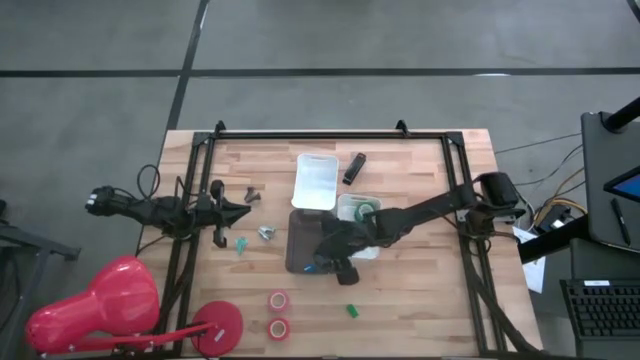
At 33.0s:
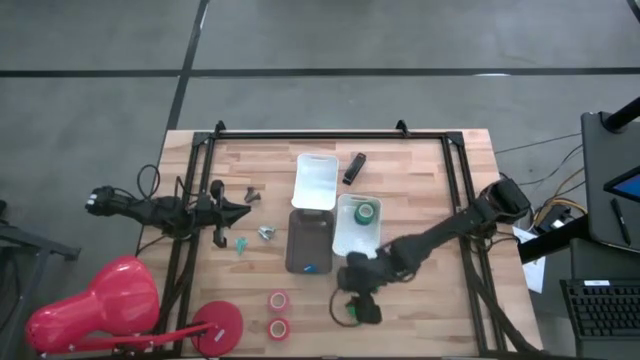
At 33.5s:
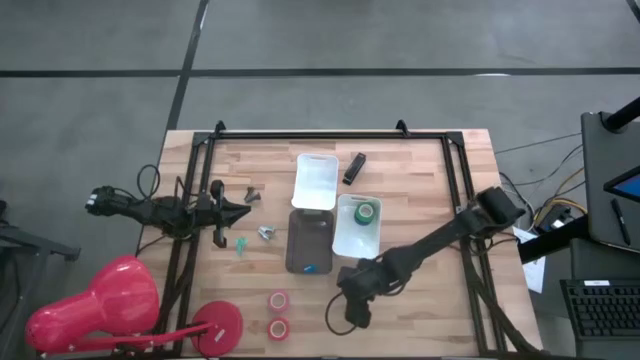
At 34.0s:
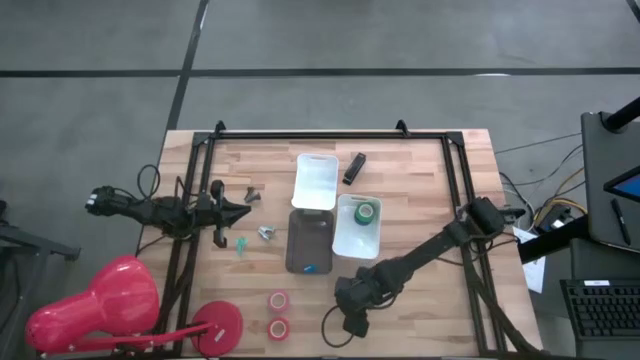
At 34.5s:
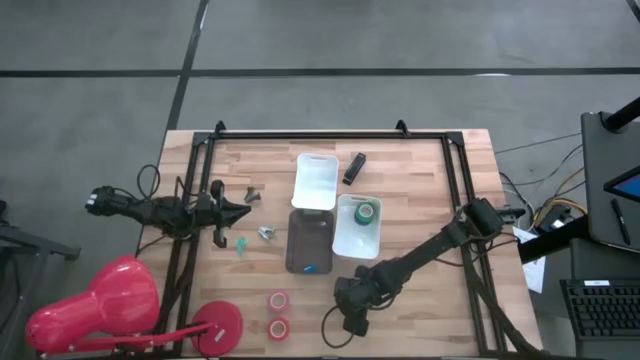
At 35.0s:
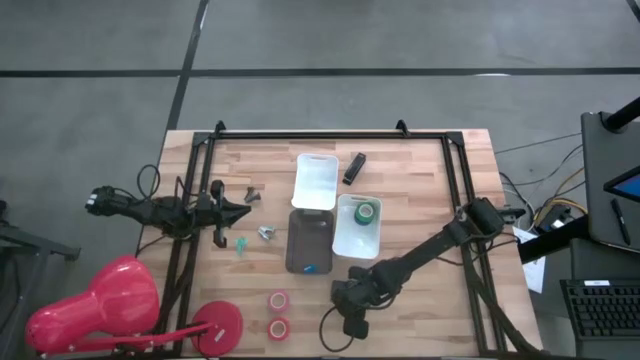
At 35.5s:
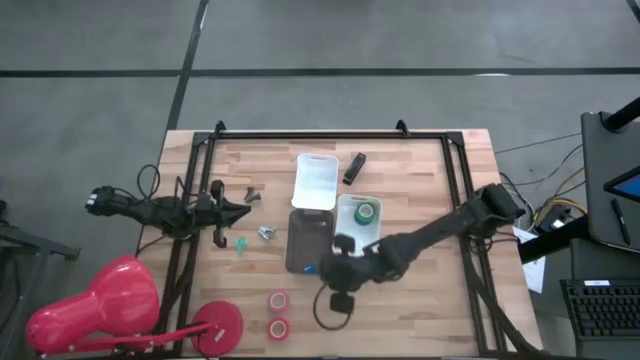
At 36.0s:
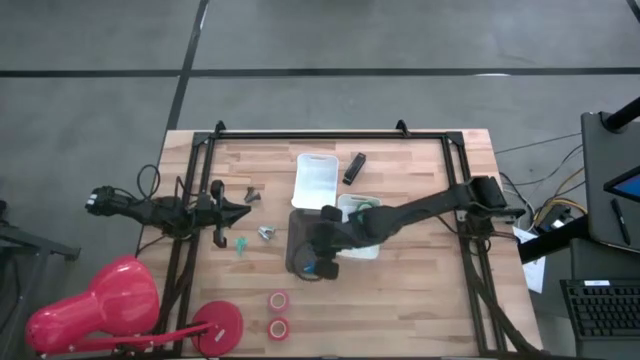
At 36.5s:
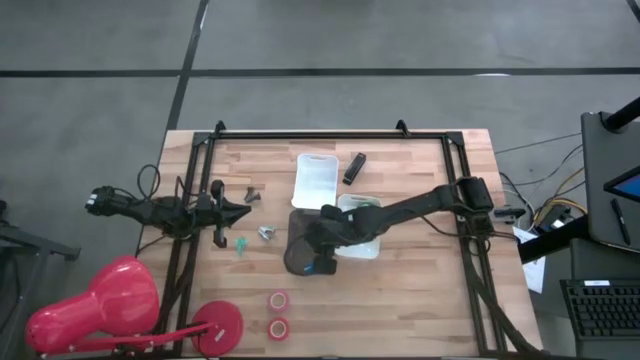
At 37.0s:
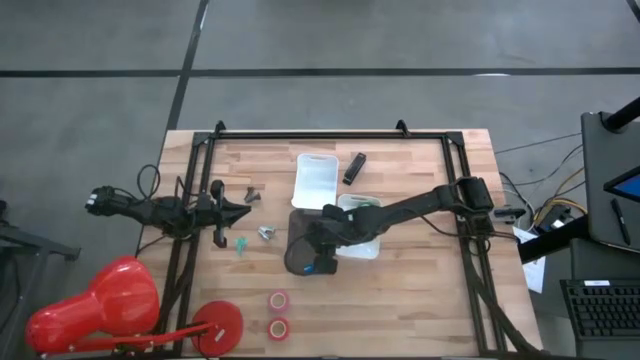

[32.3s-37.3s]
Task: Pick and place Stapler, Stapler remover, tape
Put the green stapler into the black bin

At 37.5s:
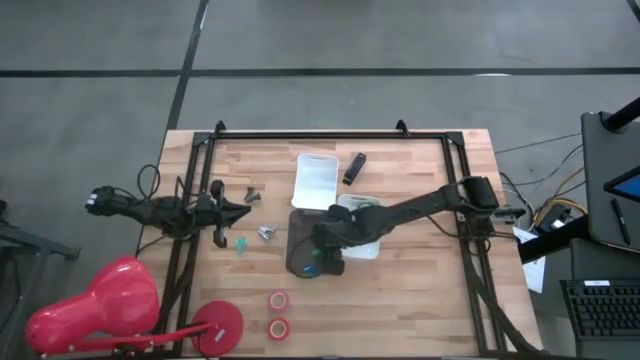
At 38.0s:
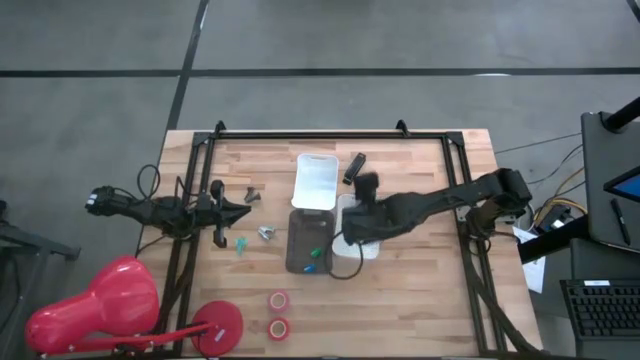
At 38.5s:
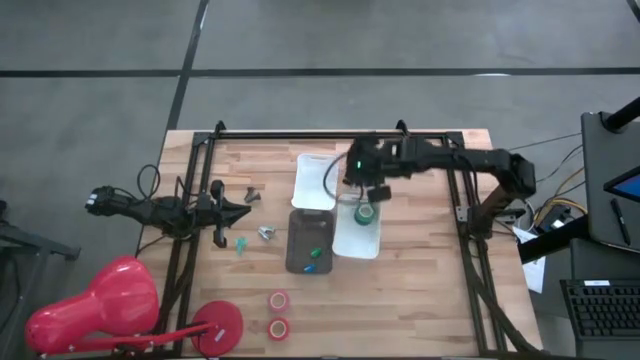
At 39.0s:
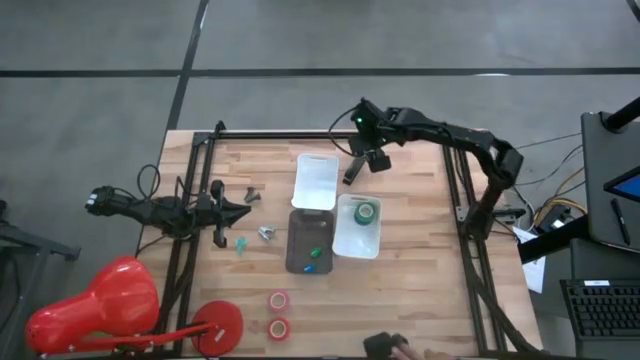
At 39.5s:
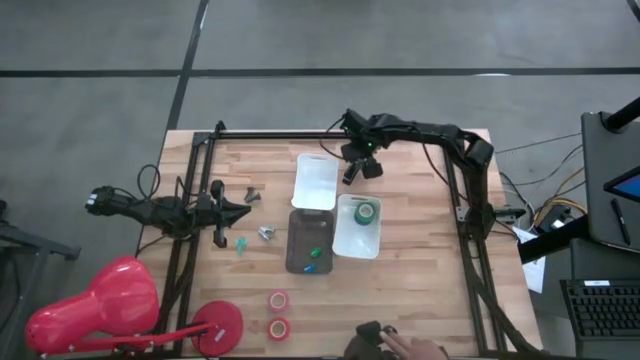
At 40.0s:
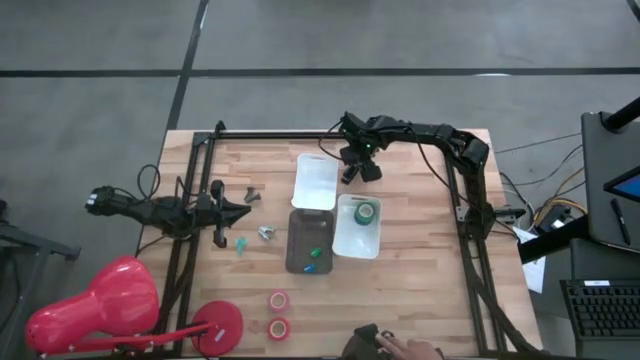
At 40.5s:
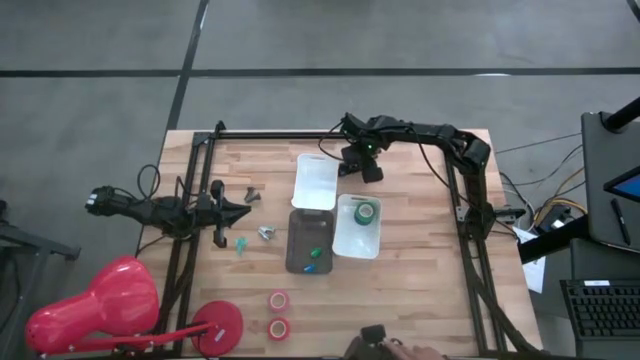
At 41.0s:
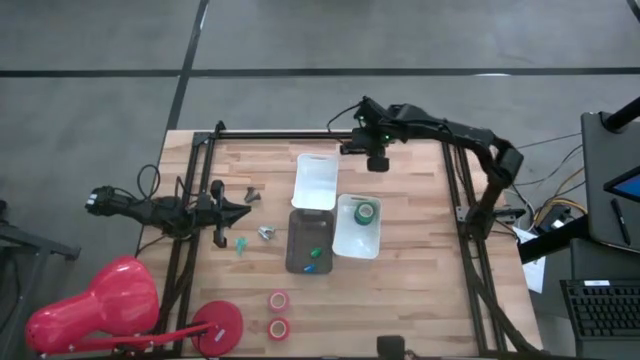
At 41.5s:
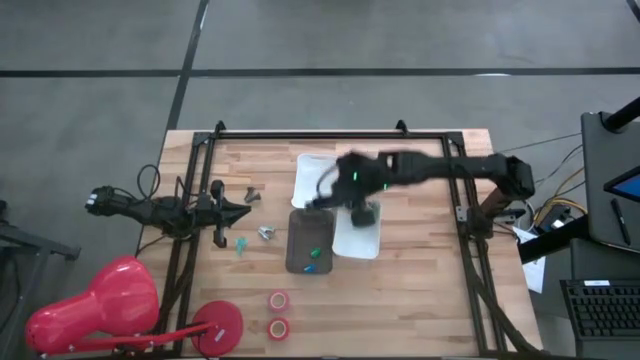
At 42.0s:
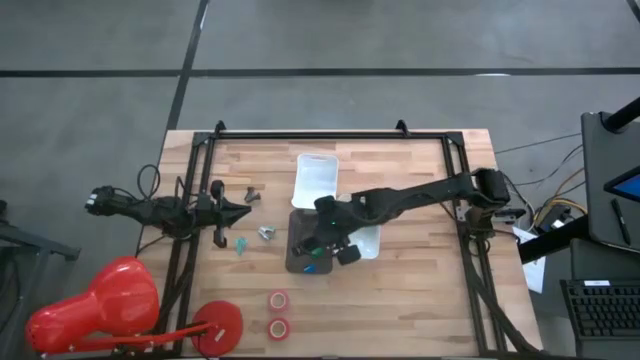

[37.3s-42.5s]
Put the black stapler into the black bin

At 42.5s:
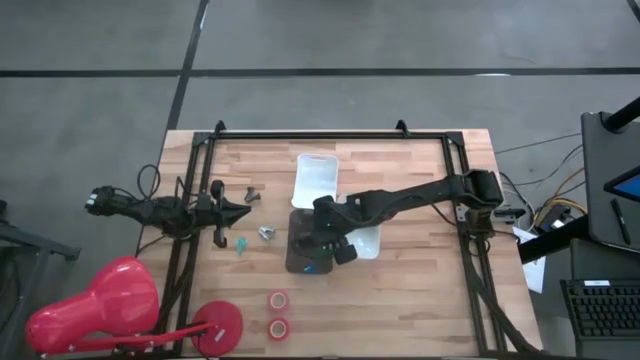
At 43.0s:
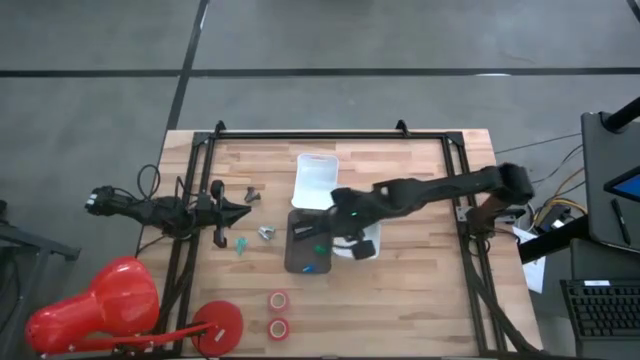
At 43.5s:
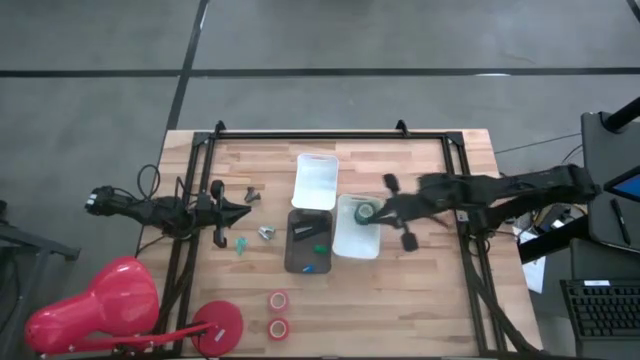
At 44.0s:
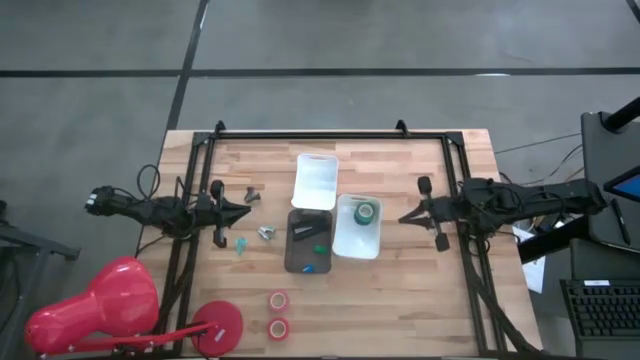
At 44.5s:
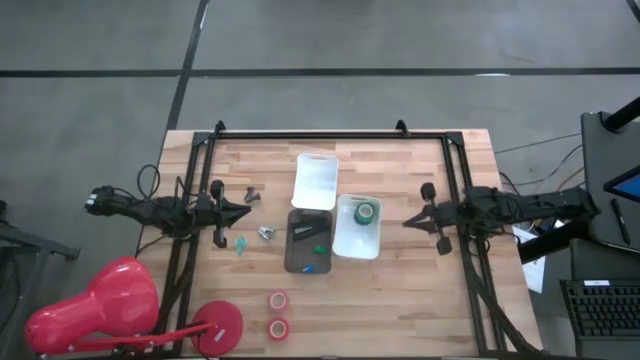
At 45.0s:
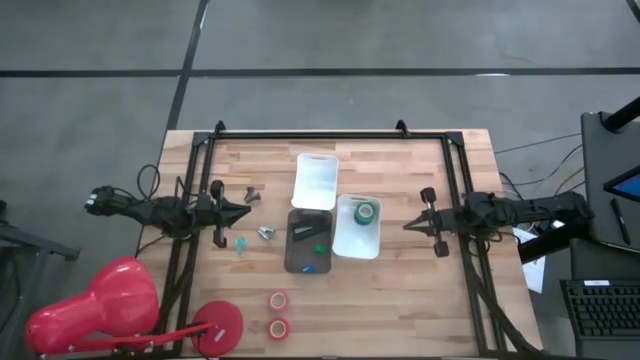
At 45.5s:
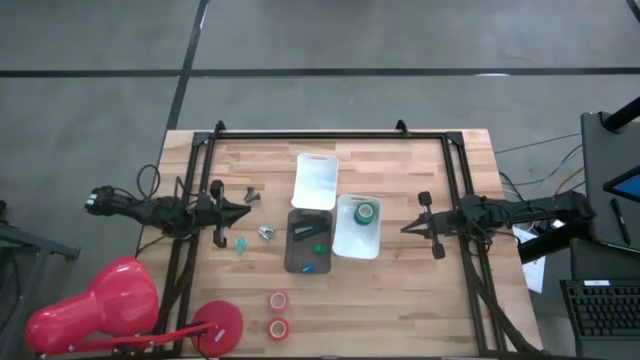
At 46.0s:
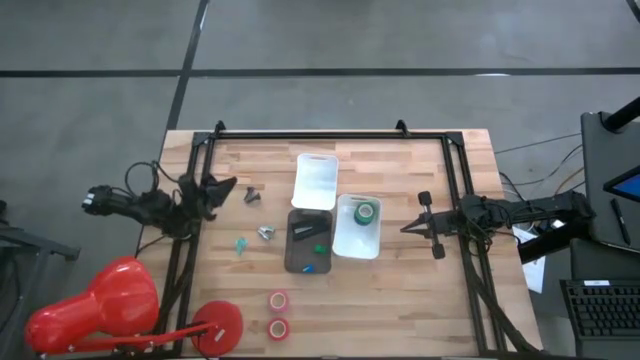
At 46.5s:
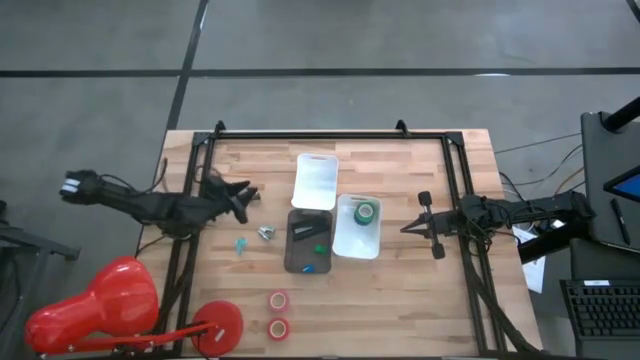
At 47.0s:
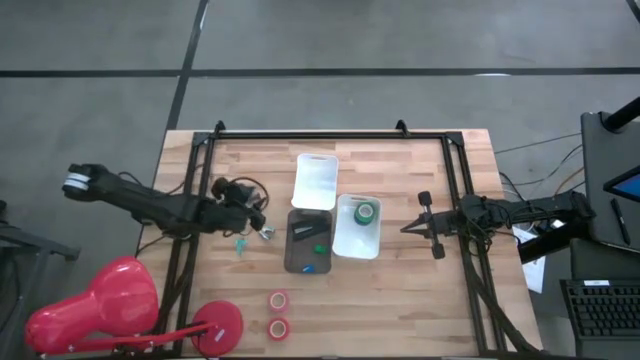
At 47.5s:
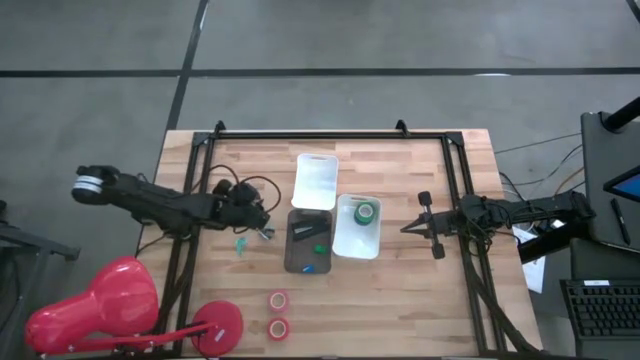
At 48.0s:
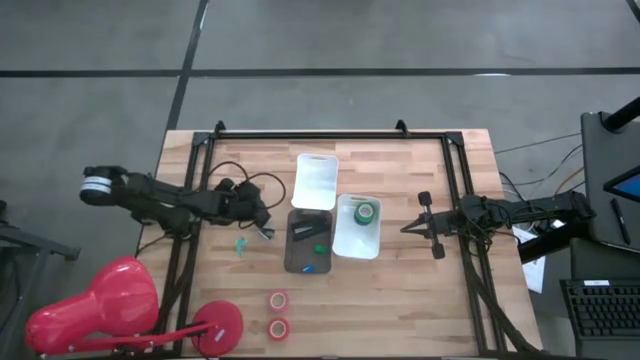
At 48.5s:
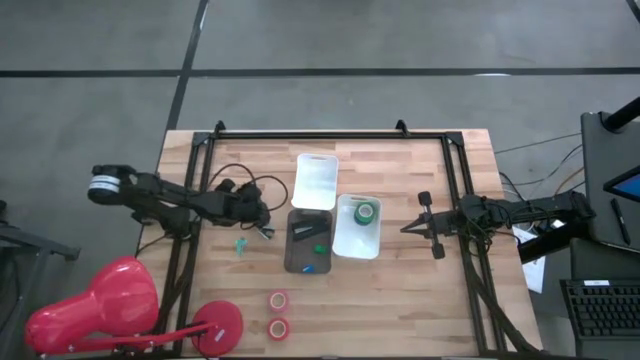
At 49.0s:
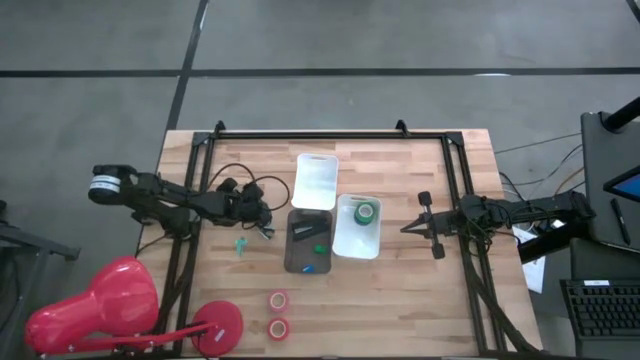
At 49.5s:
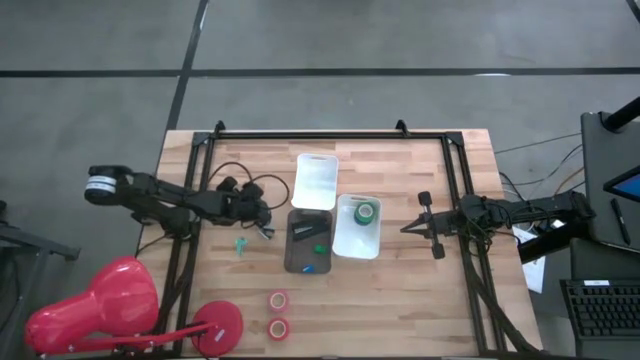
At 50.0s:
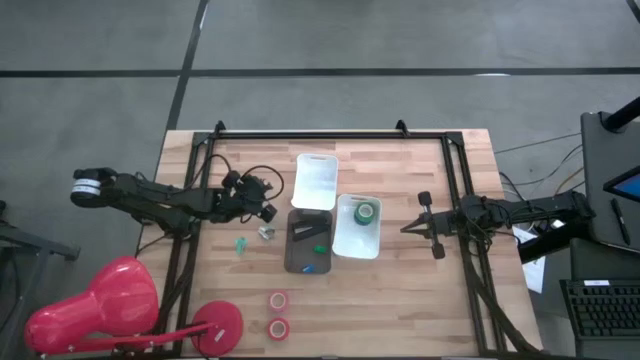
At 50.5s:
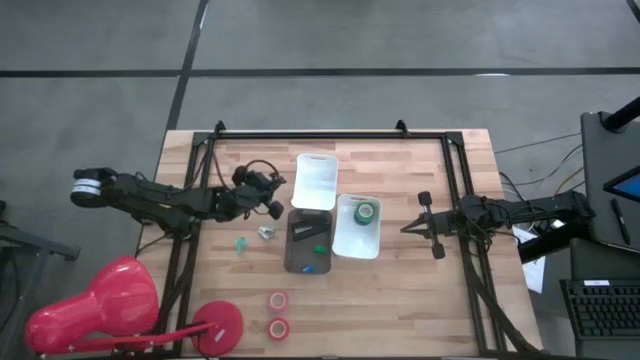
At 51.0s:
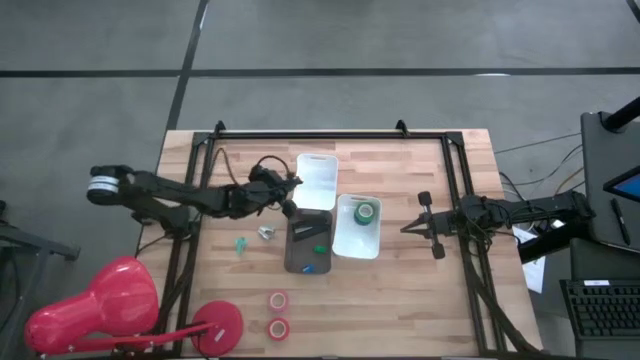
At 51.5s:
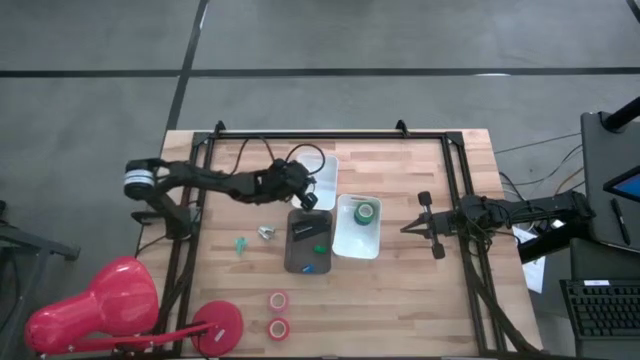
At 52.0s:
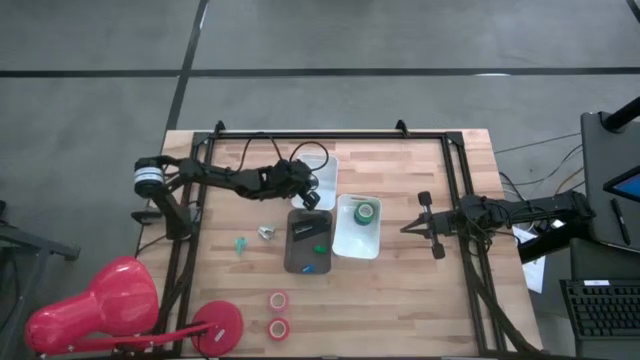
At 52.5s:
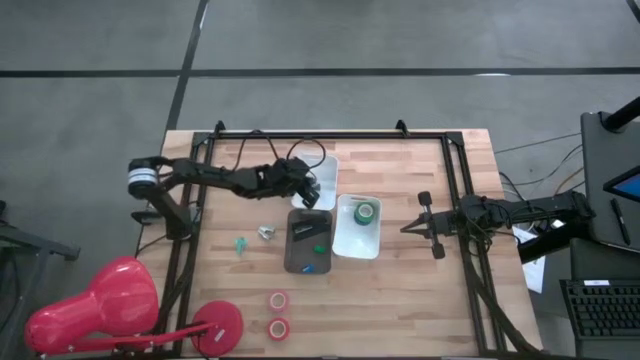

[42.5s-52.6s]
Put the black staple remover into the top white bin

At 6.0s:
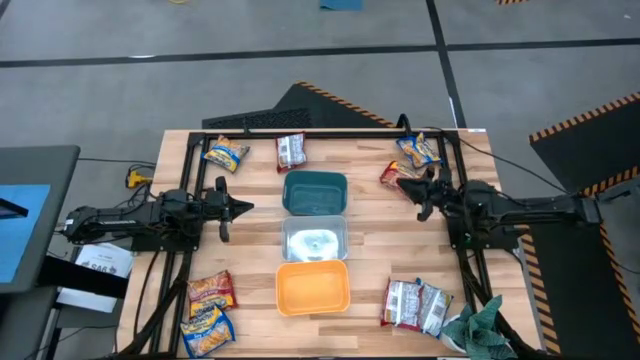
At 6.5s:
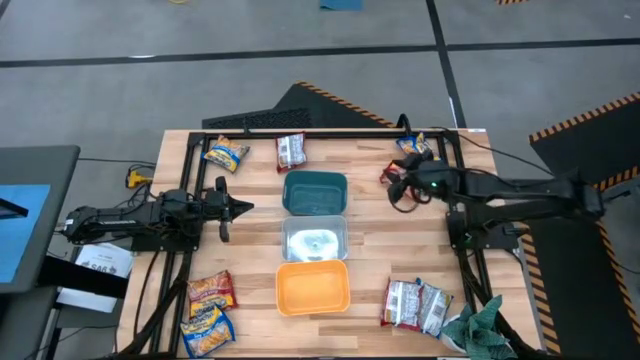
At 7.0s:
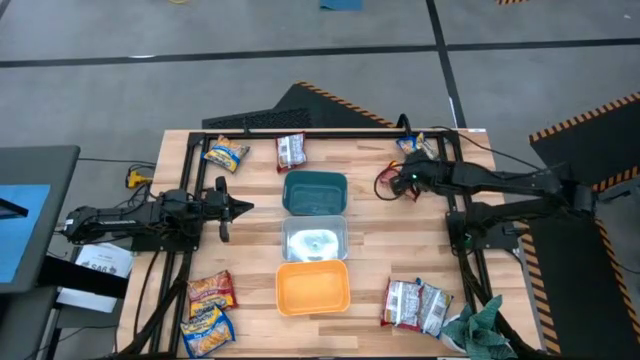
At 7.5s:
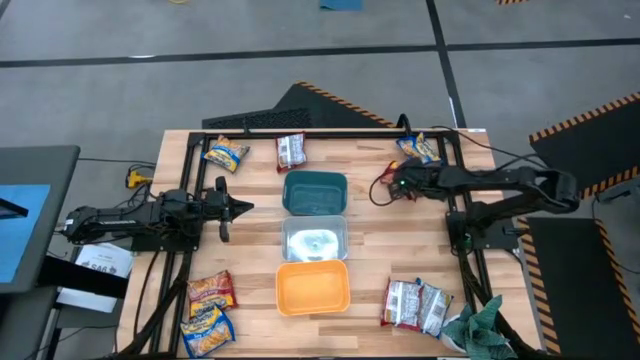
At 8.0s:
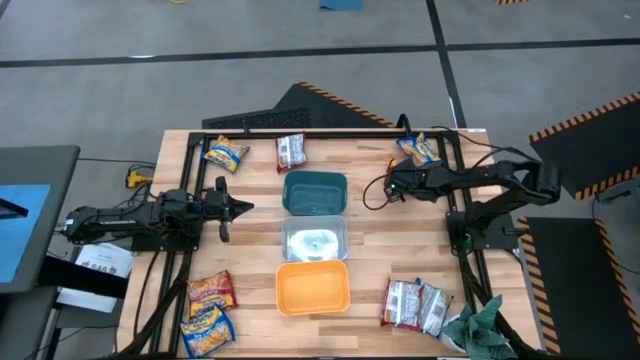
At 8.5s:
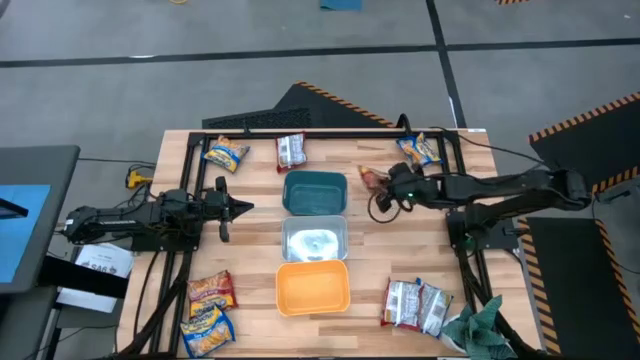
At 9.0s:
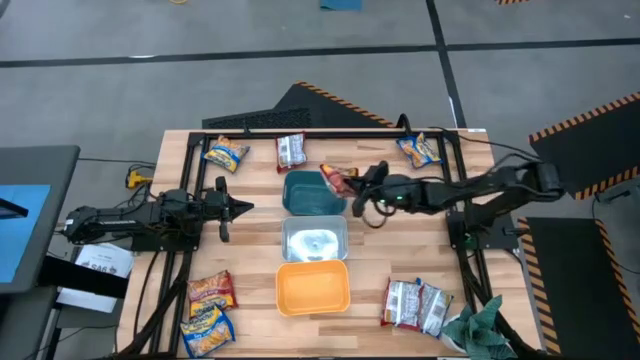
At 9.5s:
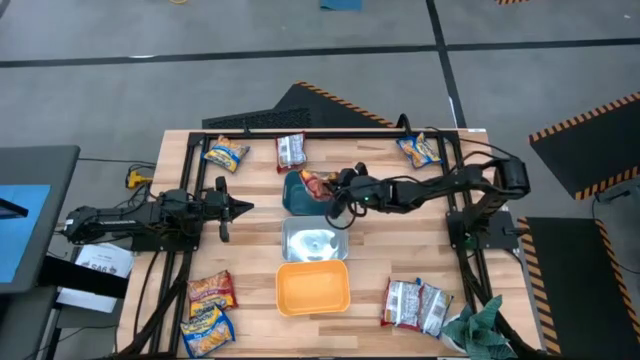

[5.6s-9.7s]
Task: Sort Maruchan noodles
Put the red noodle pack into the green bin
